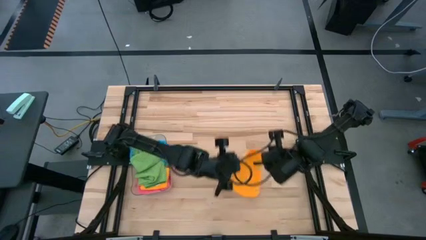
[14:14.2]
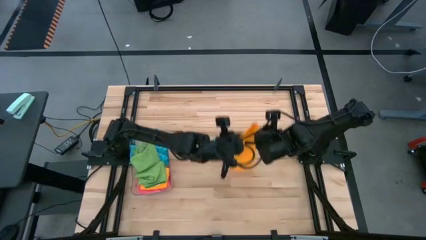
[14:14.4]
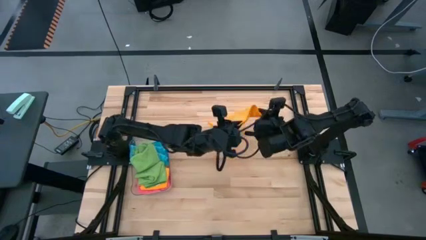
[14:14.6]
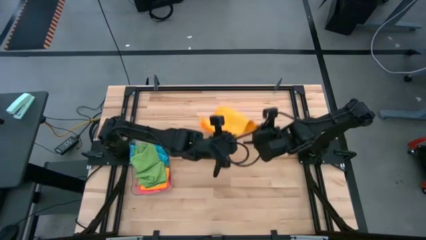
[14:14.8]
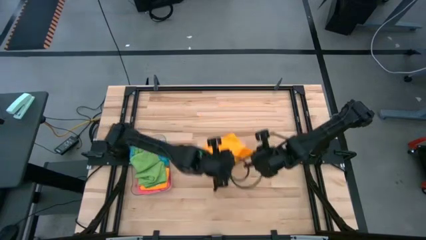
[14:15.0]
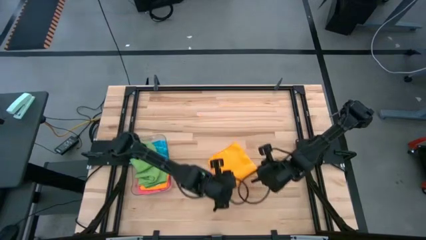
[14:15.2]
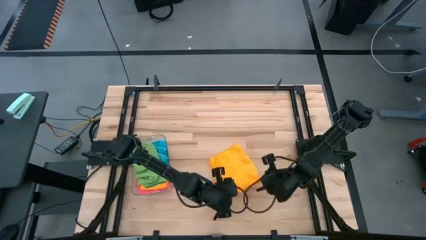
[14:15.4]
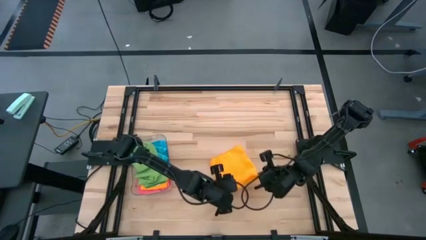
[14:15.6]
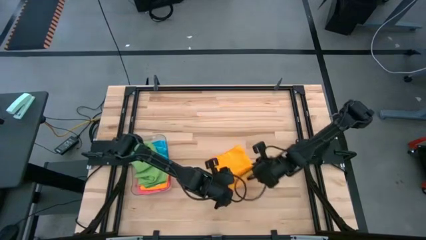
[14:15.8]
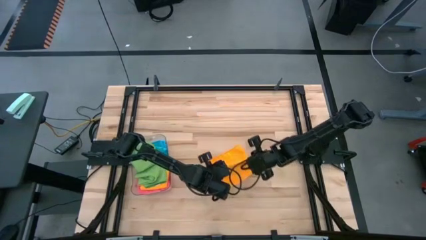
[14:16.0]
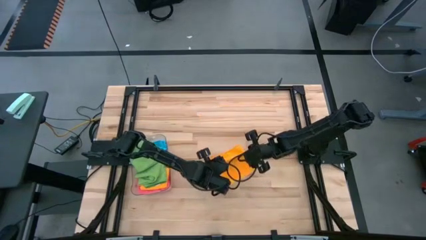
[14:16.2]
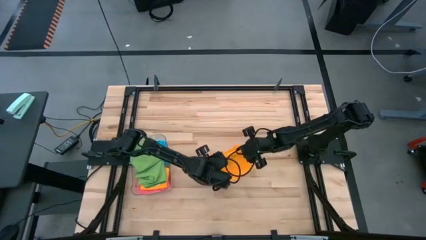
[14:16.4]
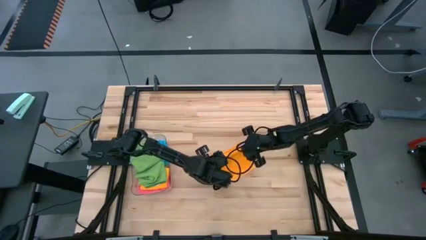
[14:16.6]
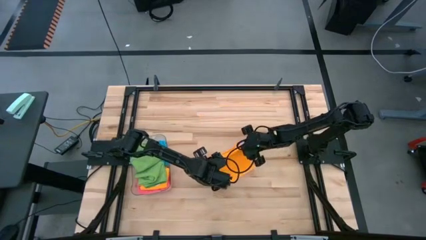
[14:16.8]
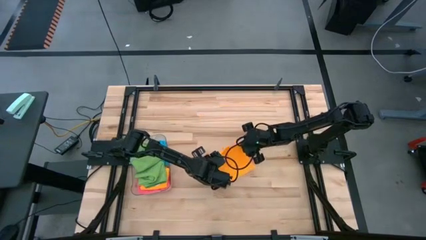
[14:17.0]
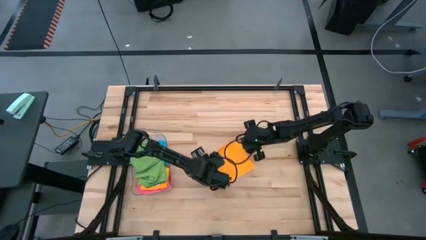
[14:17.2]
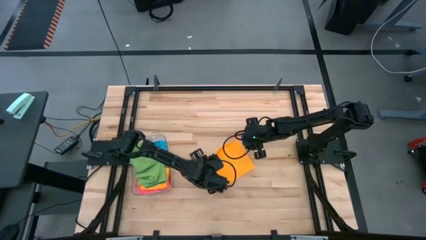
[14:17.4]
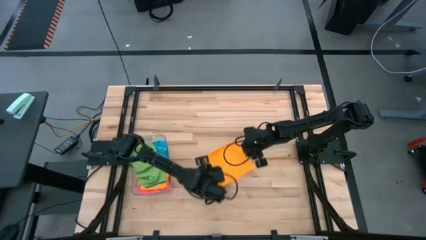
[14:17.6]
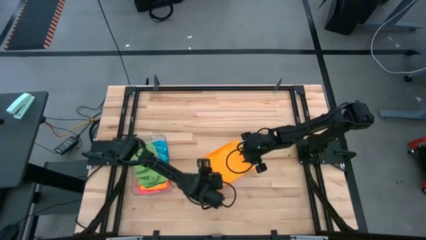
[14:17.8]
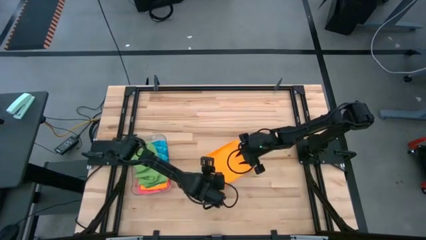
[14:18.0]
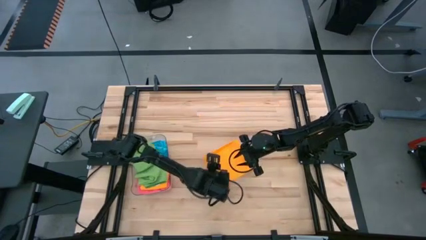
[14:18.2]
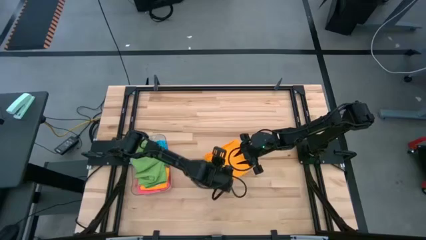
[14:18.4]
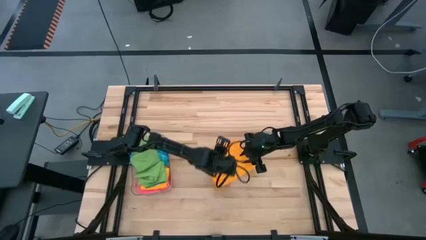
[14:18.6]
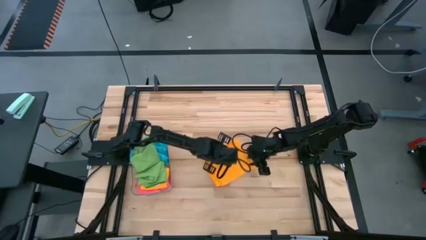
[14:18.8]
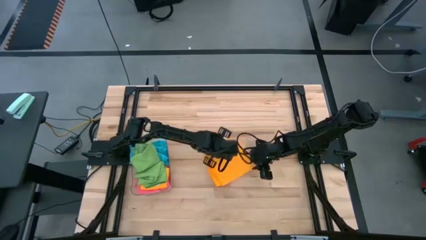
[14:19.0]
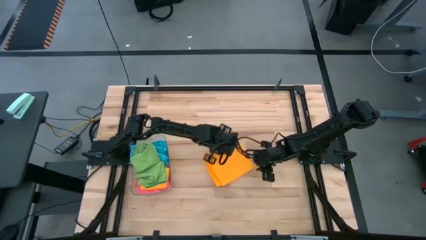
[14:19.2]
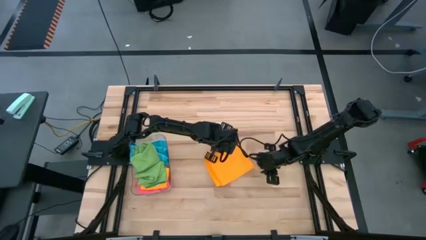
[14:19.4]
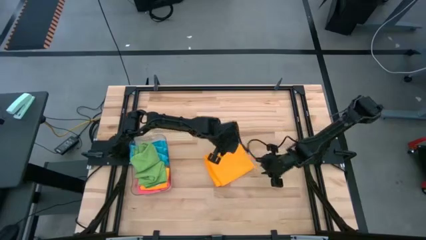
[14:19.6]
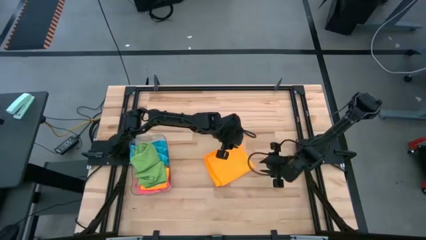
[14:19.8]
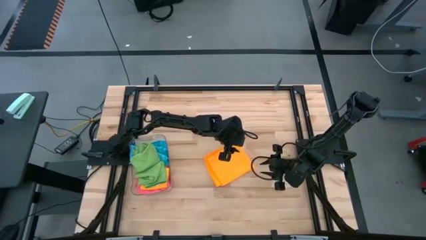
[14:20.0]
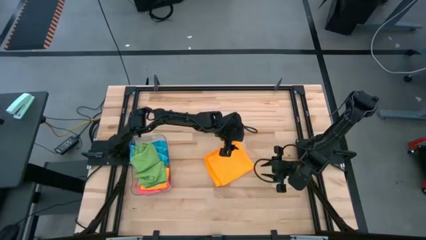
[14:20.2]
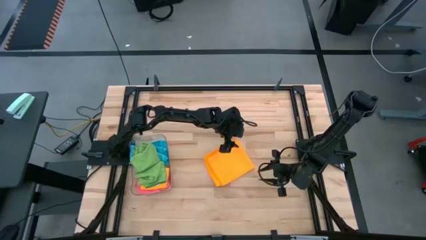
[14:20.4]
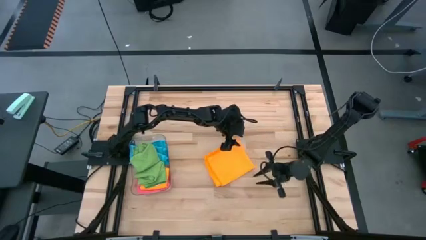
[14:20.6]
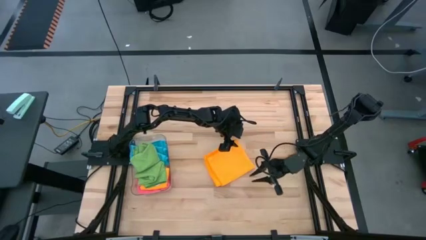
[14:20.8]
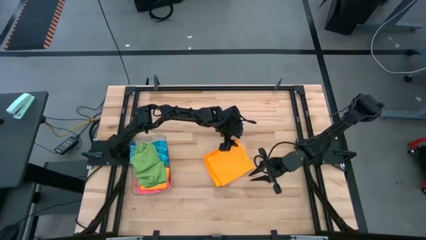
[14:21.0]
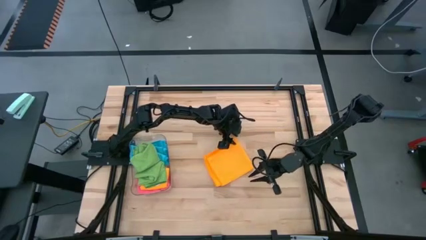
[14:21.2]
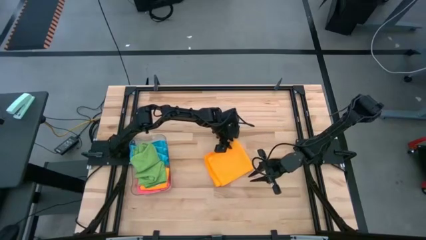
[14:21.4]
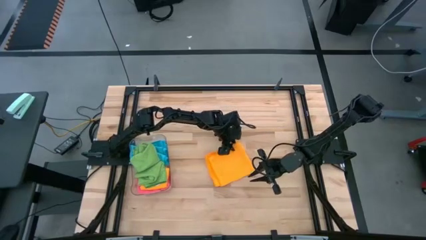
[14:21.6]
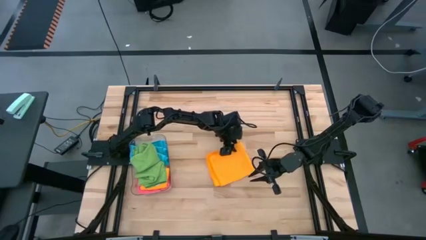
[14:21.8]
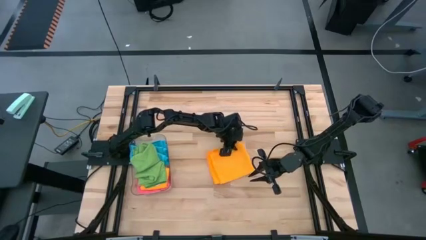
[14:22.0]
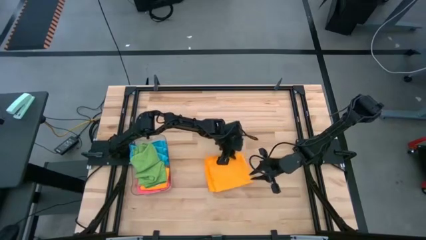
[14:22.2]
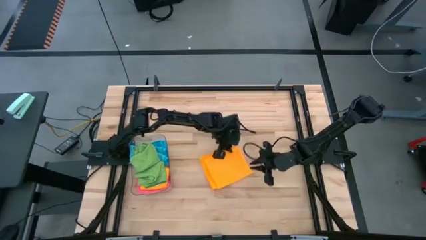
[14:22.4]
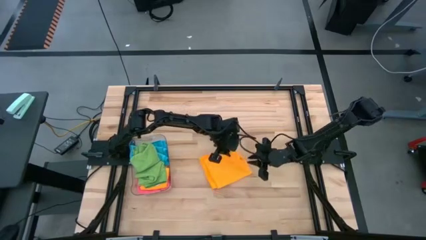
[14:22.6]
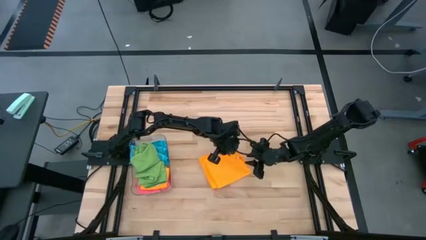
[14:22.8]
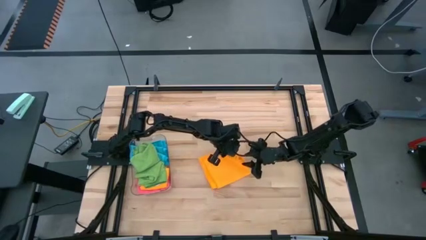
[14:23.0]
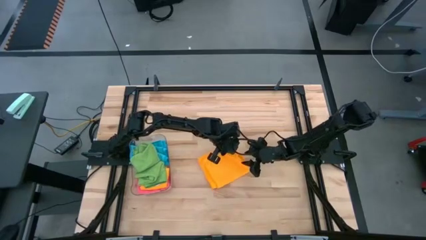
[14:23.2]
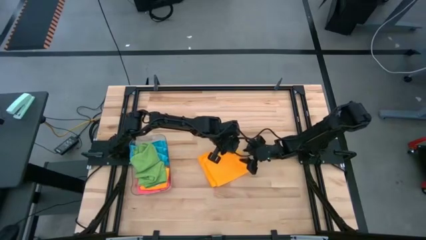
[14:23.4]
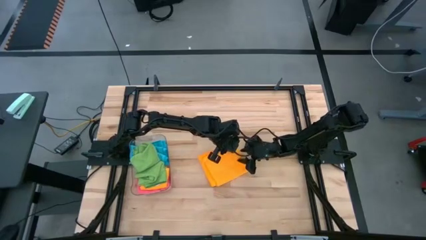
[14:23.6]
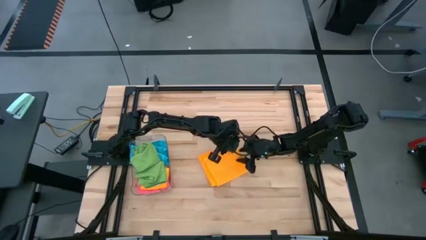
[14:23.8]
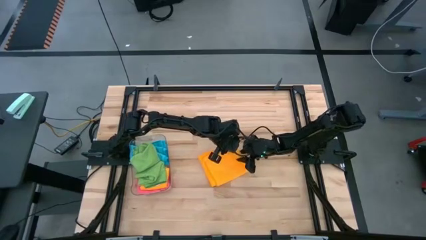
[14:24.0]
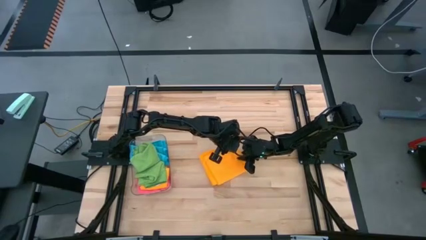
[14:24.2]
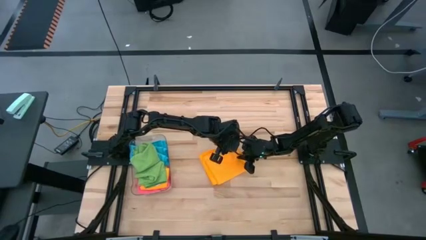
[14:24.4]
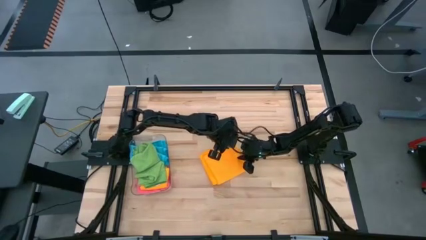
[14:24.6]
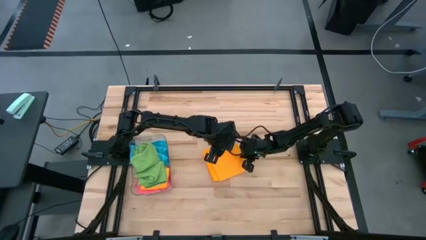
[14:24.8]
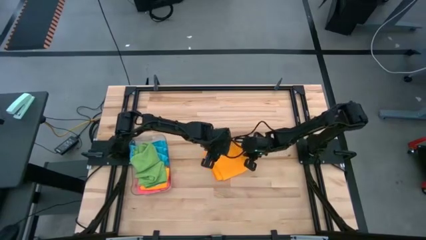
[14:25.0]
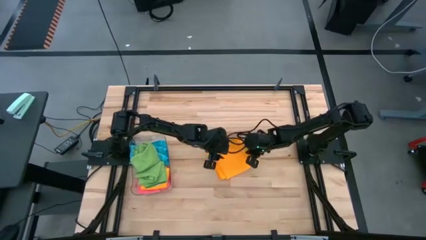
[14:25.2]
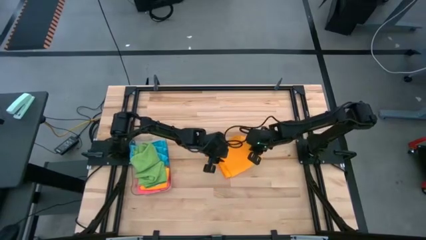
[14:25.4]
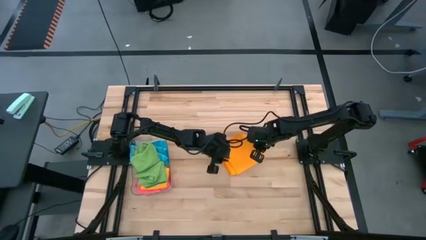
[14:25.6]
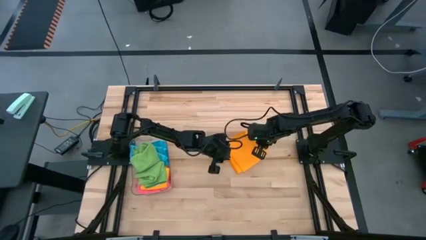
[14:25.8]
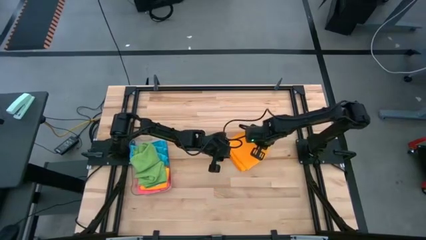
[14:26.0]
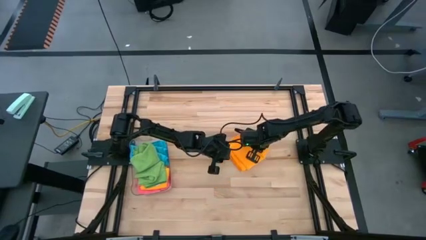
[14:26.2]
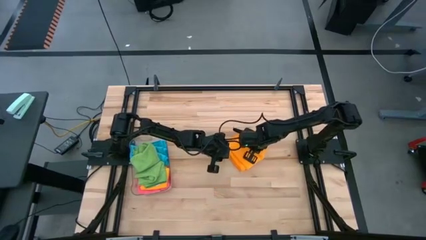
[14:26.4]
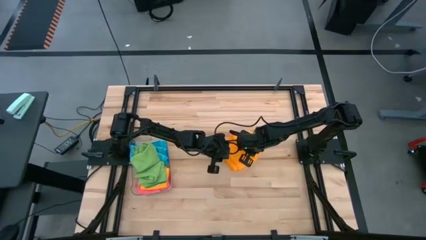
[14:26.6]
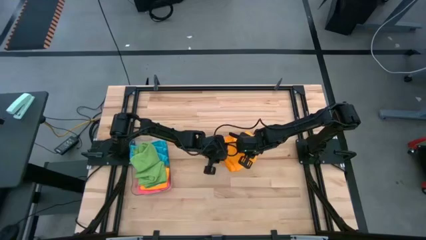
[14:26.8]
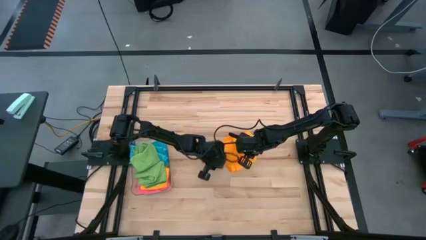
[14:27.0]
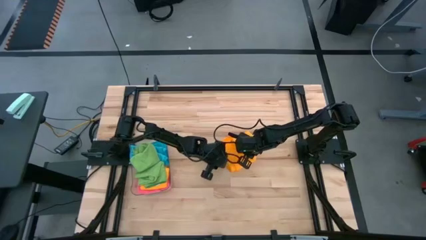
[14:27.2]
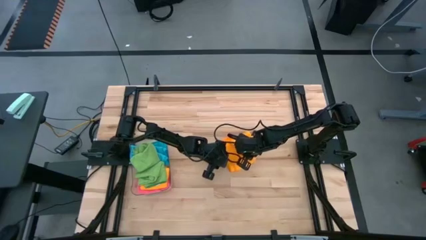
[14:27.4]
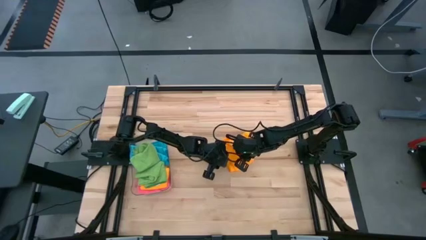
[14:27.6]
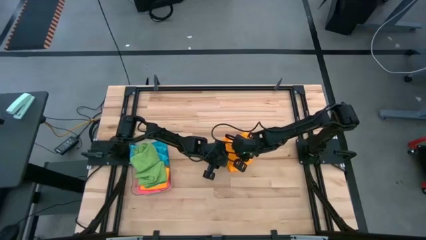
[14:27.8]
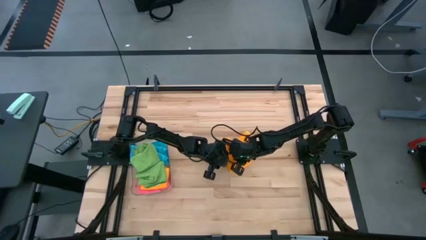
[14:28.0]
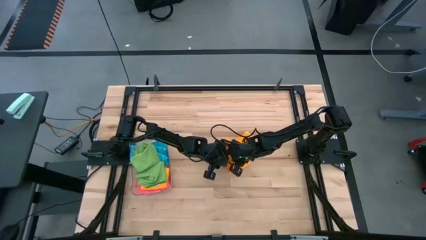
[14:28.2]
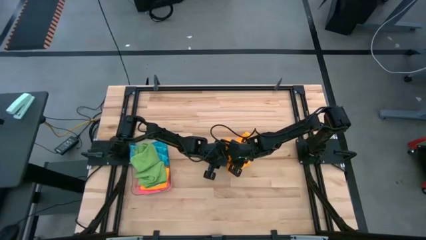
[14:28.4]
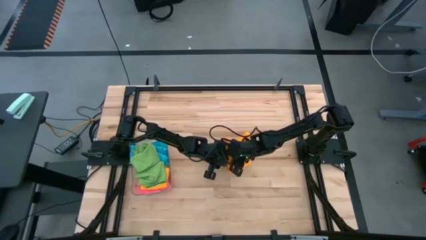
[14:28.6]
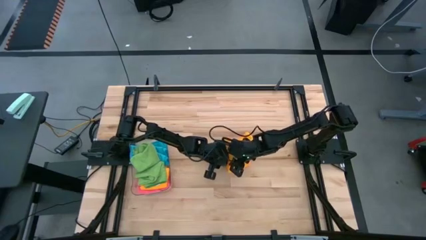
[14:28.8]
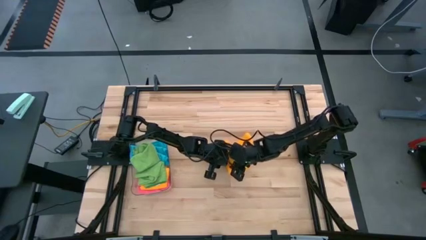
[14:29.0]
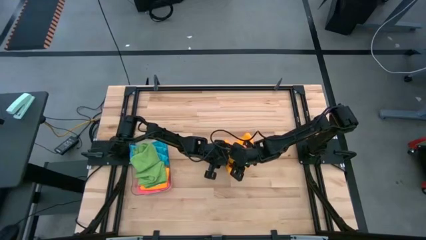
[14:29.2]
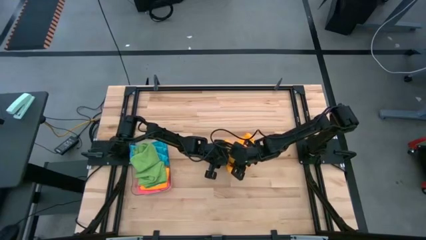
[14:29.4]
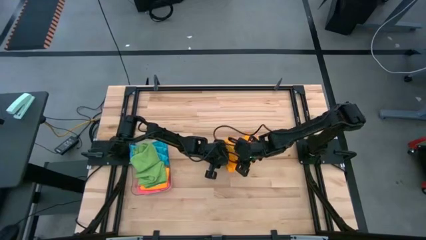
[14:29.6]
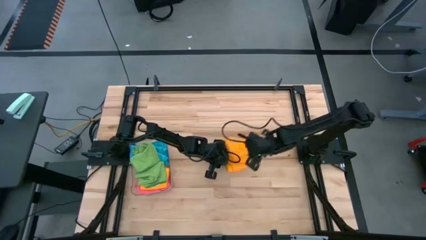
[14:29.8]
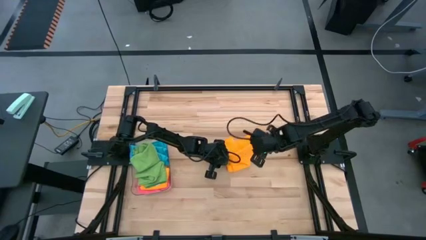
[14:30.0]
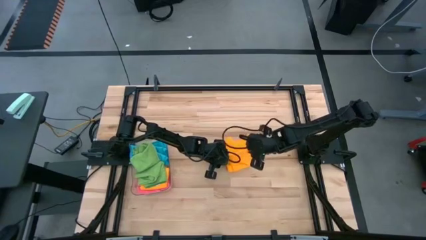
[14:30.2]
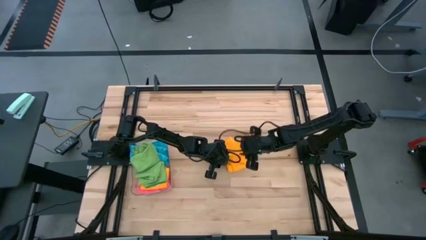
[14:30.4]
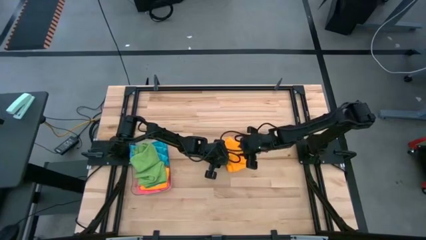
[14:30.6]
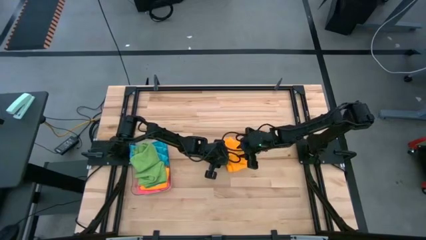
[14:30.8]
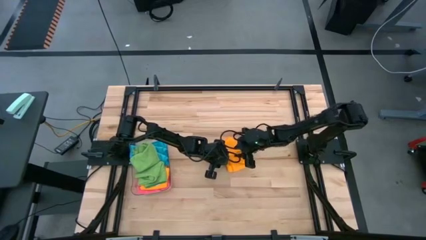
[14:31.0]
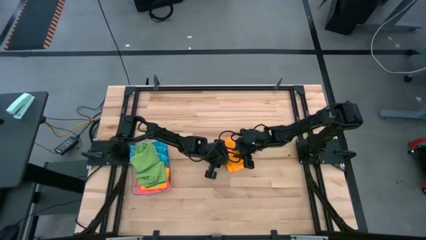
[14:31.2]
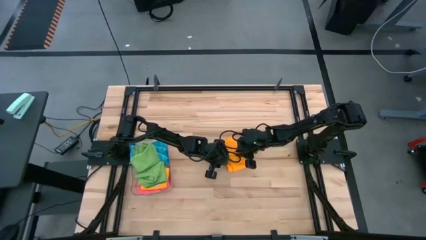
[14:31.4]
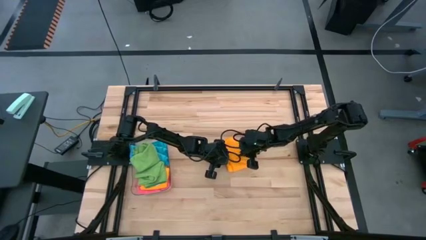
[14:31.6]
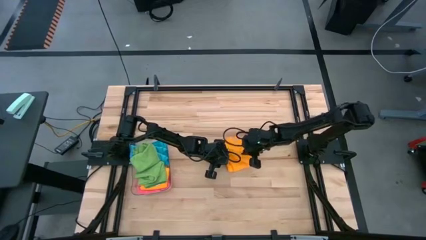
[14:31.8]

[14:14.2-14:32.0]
Task: Fold microfiber towels
Fold the yellow microfiber cloth
